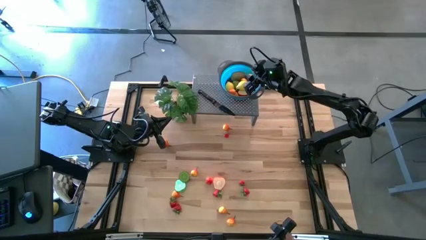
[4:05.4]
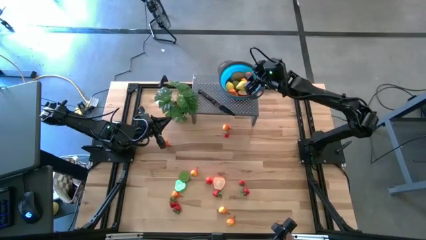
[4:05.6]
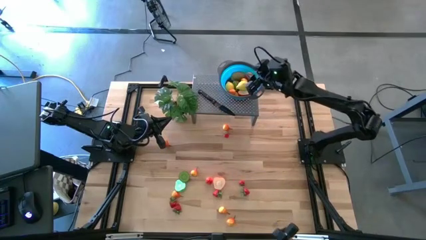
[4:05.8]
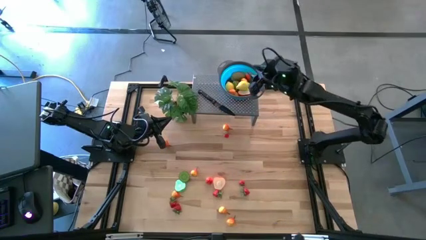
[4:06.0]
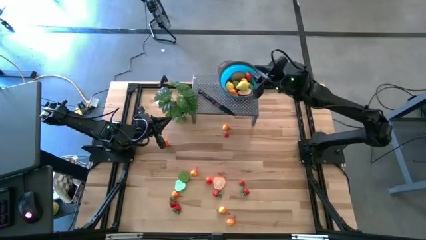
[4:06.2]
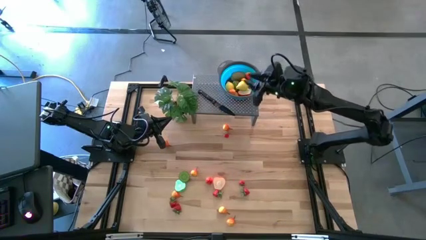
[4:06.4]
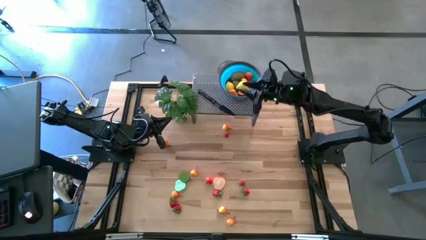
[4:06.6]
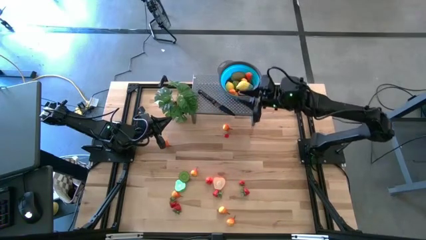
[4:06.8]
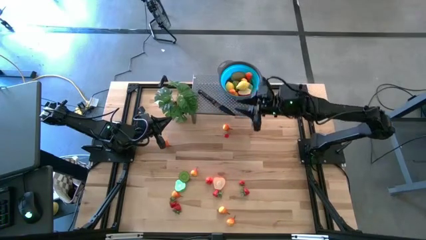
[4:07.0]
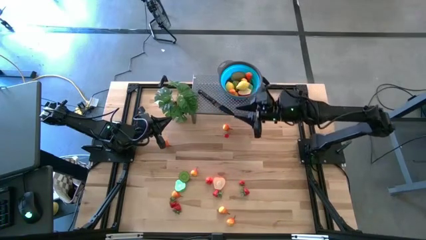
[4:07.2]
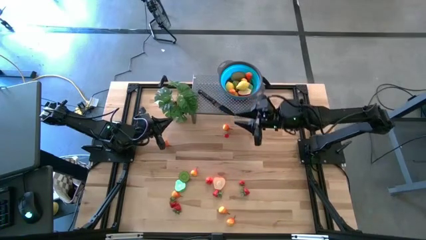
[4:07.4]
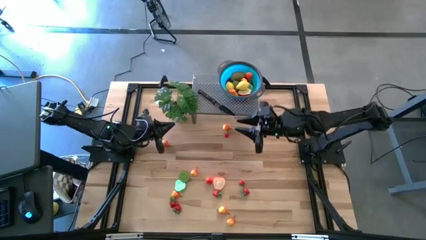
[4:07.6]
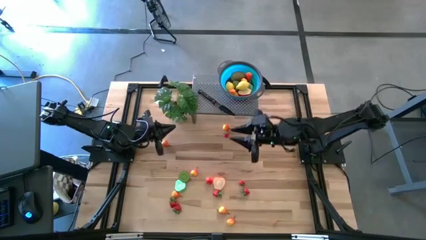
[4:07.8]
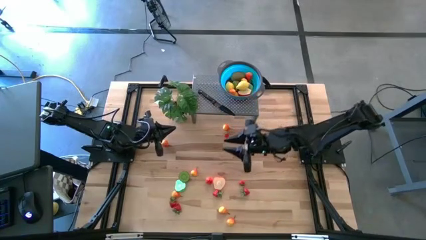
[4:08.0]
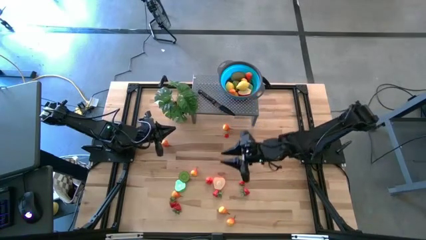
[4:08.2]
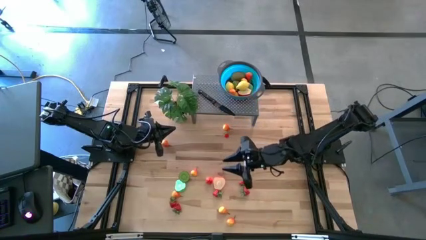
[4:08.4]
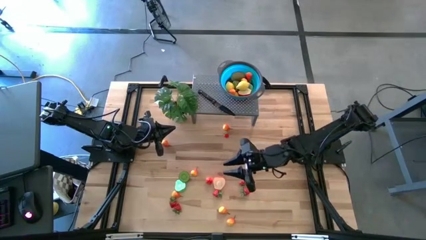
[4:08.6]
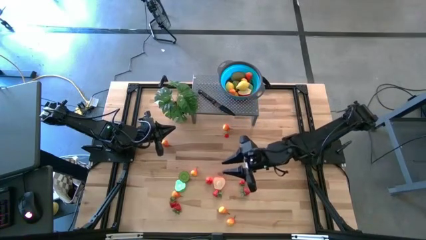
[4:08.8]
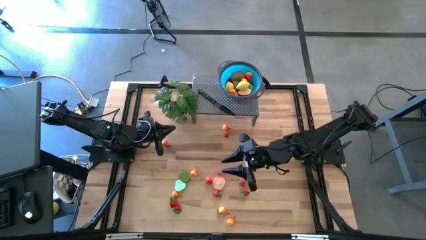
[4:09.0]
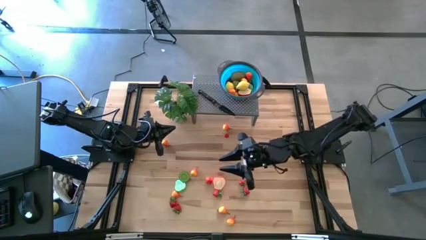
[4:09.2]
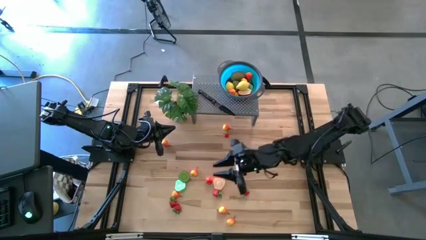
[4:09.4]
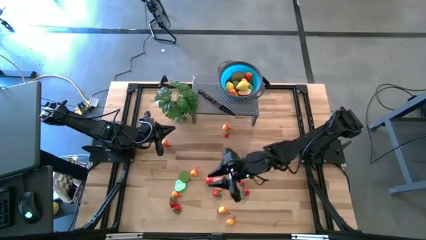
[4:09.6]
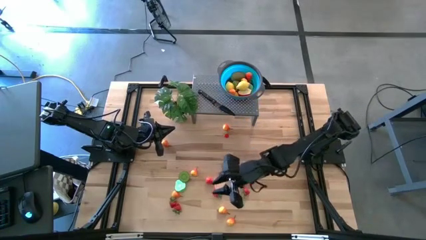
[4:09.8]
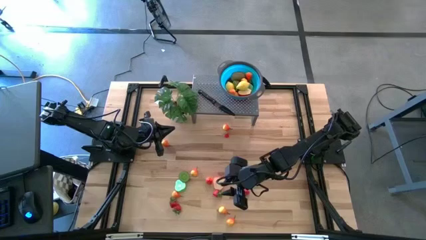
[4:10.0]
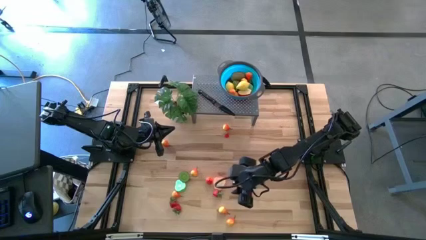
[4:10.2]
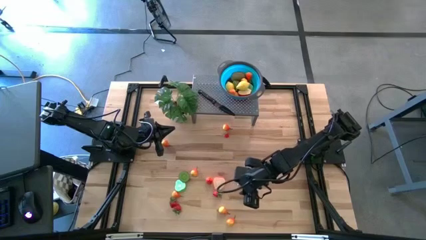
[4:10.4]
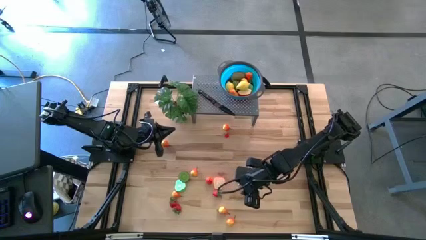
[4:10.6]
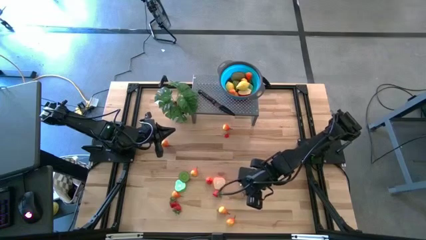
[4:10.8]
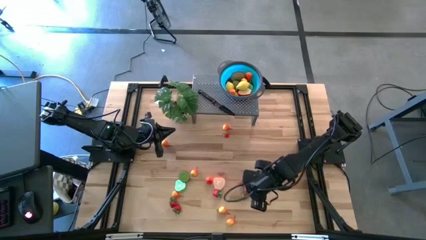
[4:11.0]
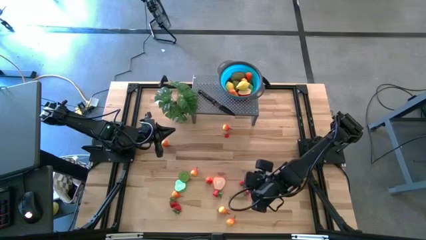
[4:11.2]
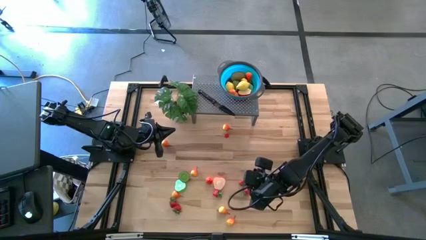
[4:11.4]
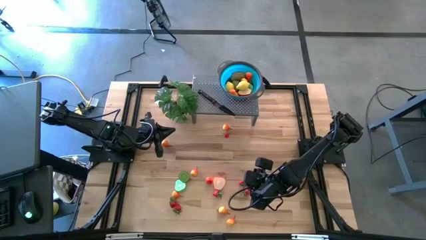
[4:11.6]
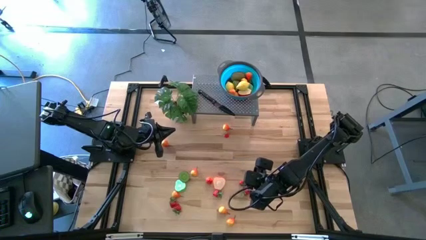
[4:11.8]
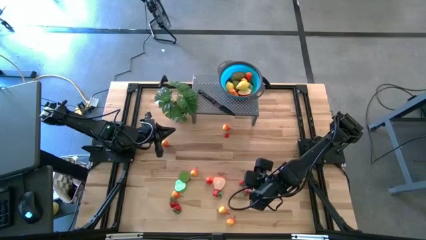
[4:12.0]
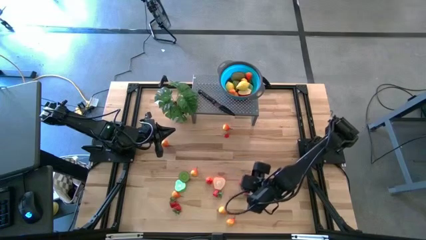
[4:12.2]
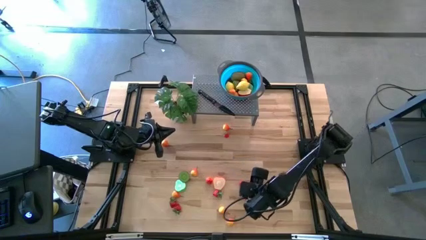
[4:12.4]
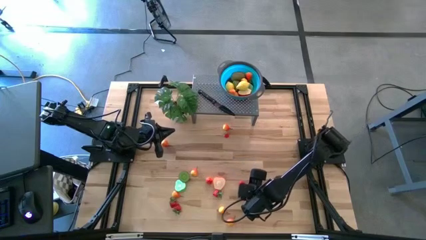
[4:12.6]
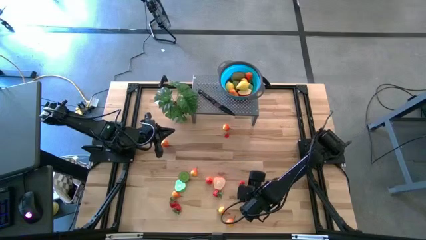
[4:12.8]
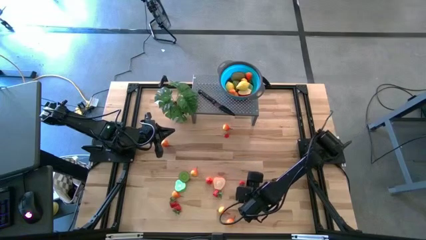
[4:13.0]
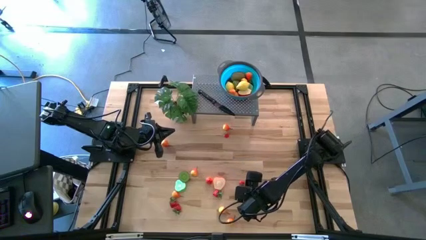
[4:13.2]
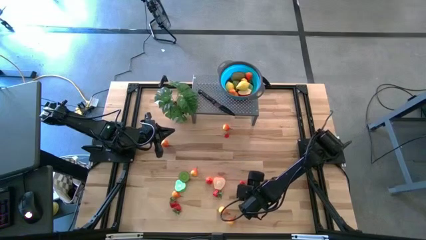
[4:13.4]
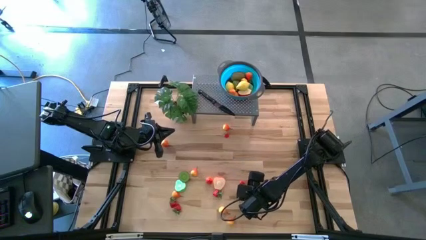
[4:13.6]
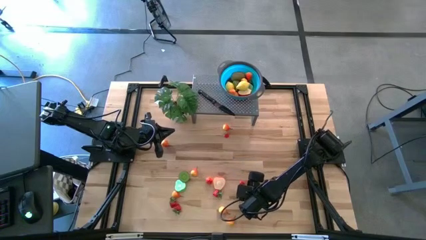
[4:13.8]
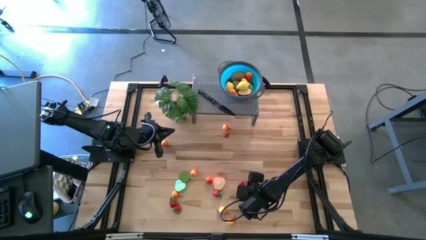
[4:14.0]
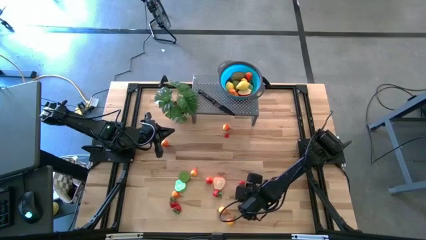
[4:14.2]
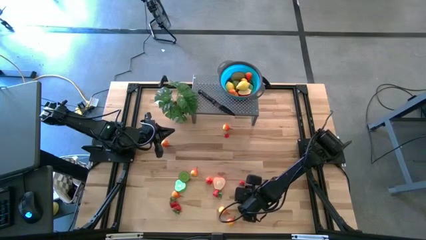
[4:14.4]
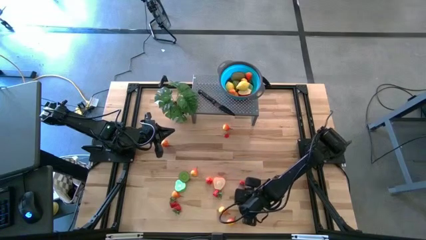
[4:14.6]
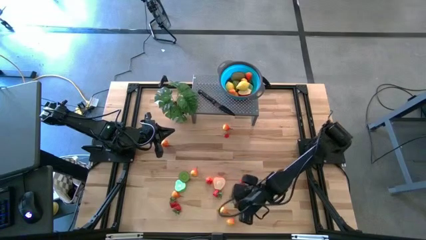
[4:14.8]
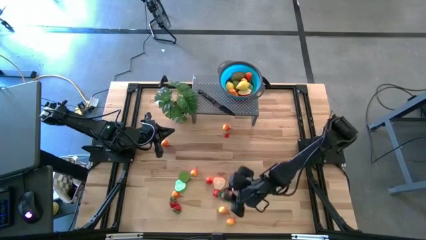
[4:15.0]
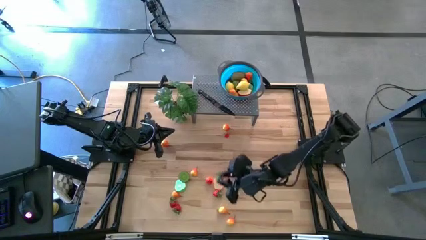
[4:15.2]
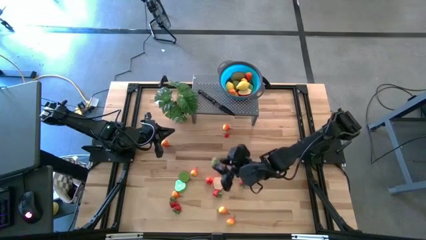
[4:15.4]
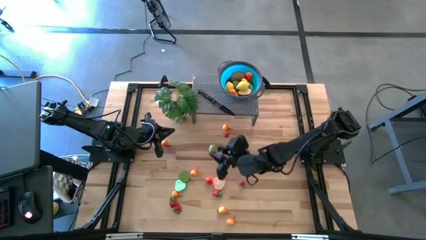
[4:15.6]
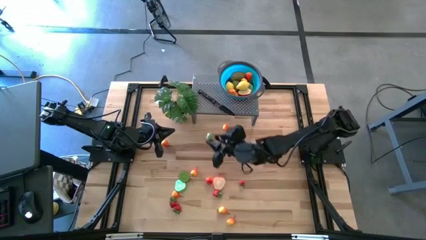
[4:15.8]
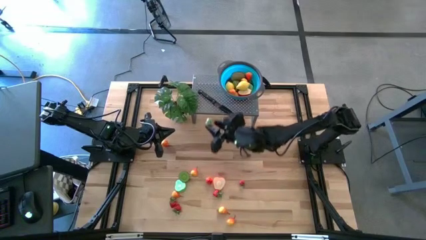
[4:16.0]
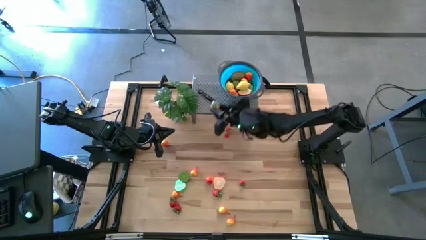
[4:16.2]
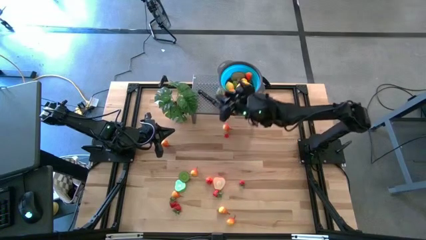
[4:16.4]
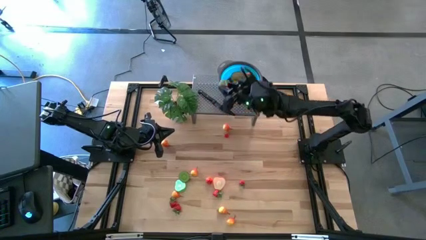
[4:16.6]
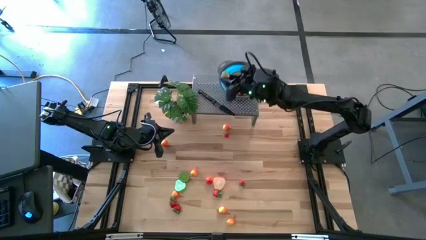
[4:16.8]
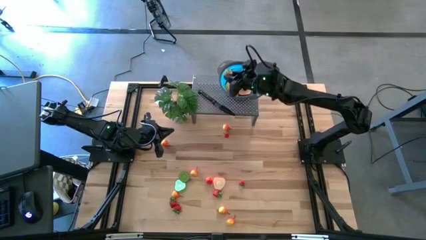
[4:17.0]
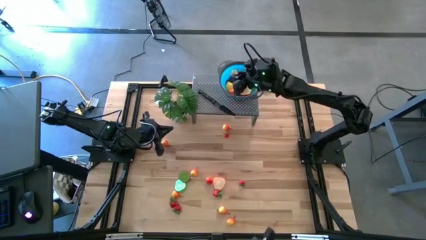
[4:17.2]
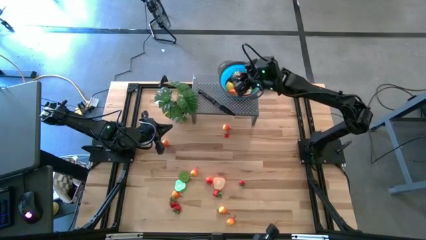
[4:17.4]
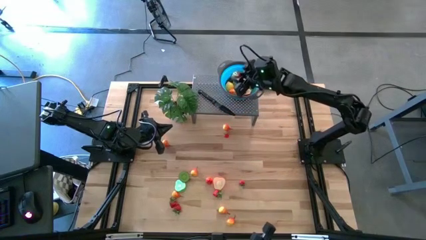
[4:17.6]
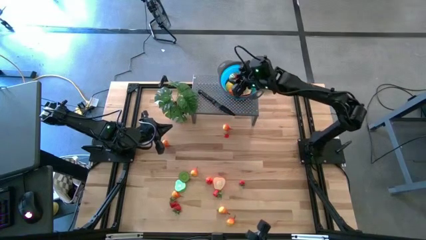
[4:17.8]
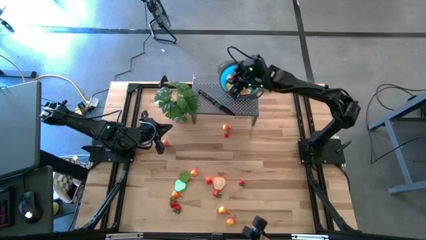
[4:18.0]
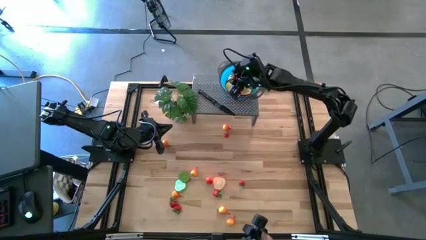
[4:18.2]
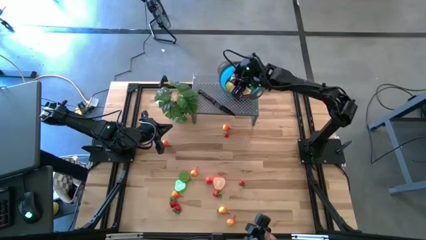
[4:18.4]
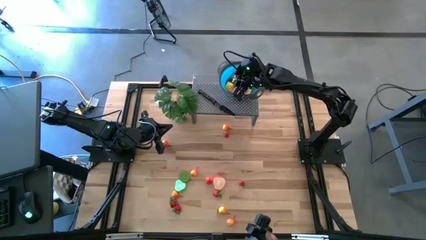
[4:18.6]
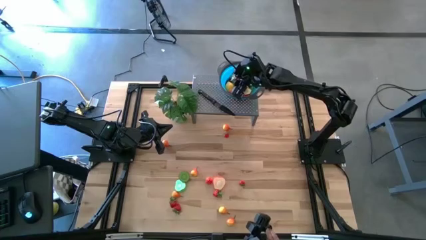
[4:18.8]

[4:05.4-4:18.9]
Task: Pick & Place Fruit
Put the red strawberry in the blue bowl on the shelf

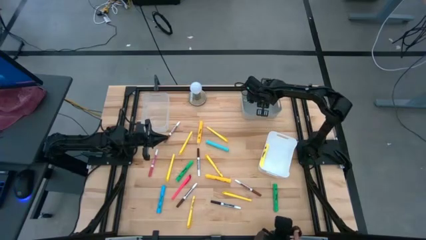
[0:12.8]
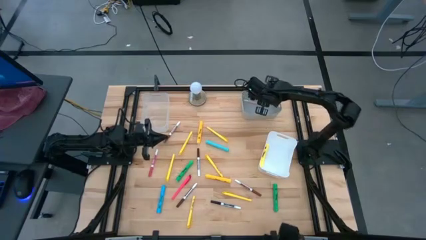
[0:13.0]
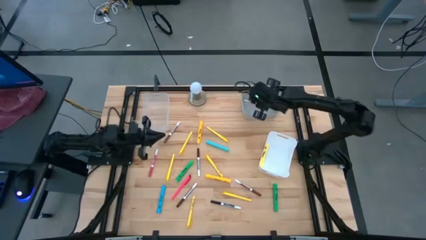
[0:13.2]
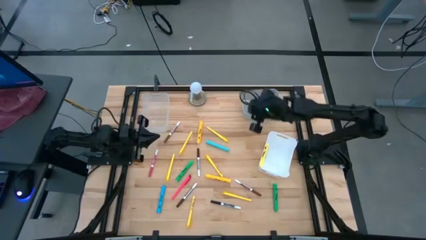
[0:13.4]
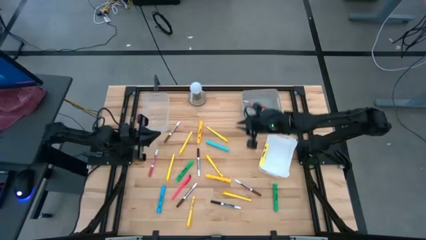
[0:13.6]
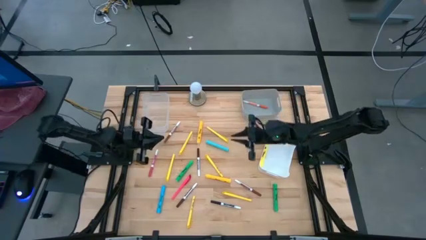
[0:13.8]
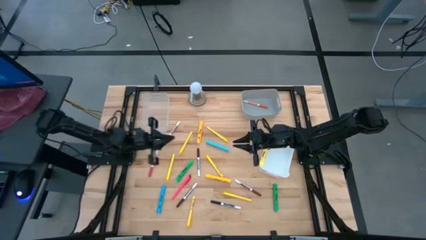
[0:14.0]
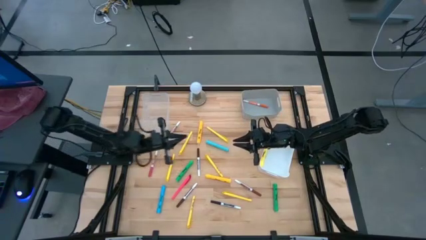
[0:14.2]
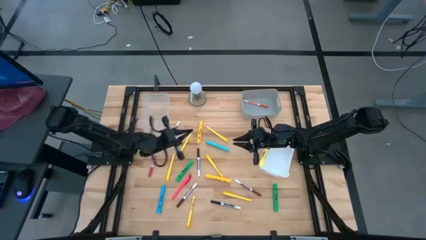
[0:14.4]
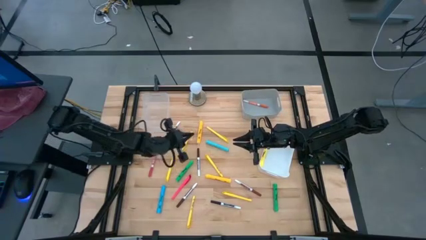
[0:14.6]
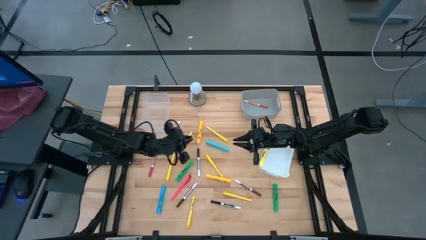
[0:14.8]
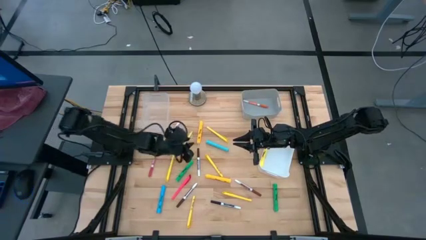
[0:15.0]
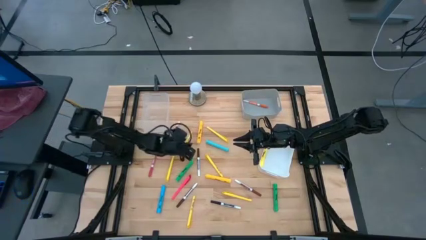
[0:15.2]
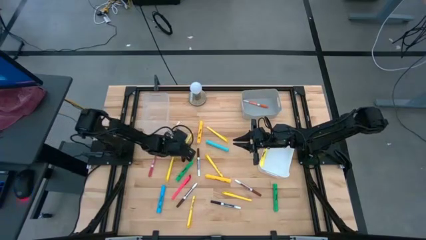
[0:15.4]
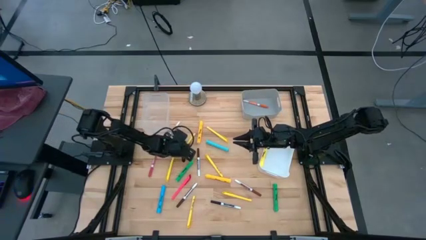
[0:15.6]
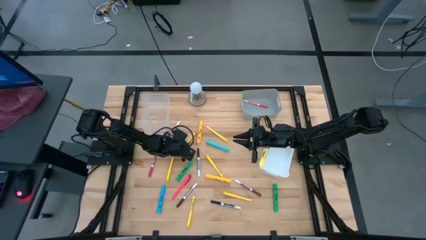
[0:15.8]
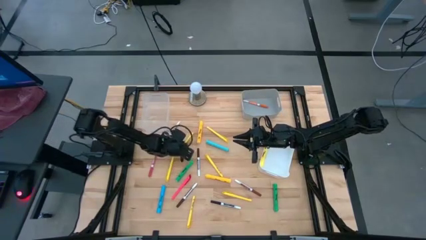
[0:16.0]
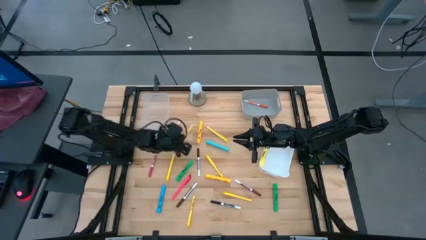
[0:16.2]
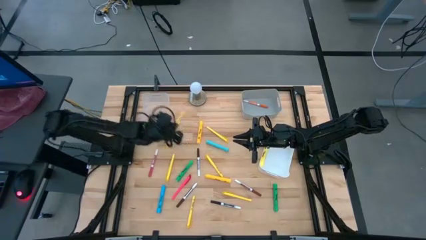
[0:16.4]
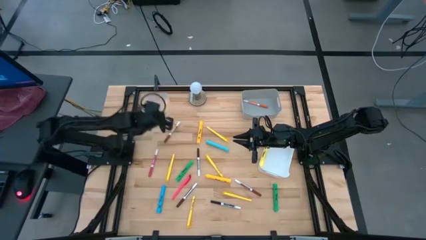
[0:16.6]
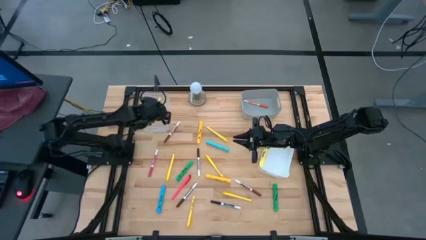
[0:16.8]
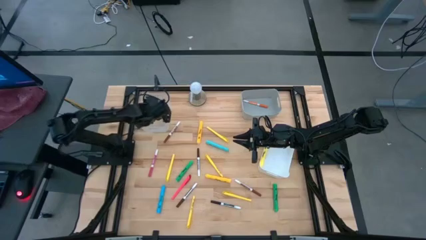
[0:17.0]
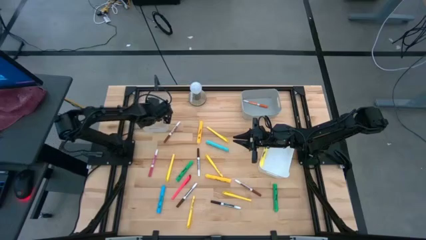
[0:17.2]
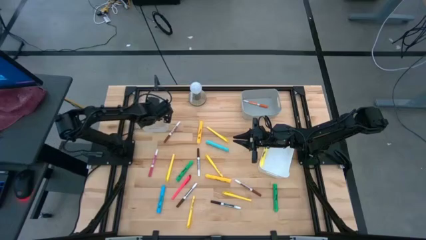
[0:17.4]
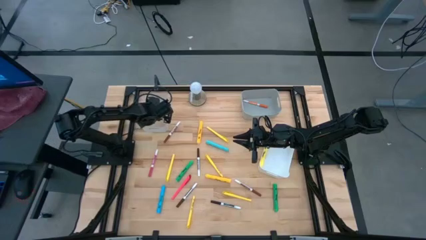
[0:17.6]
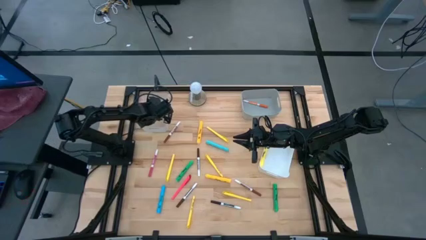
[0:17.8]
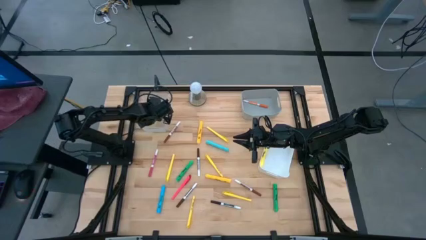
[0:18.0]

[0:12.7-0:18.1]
Task: Pick & Place Markers
Put the yellow pen into the transparent bin
